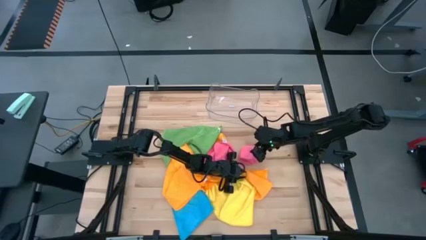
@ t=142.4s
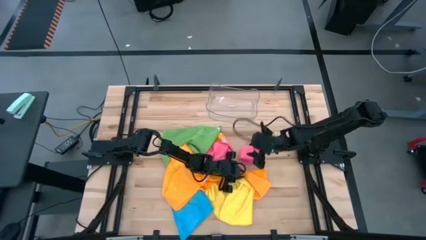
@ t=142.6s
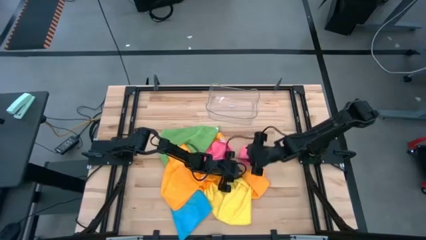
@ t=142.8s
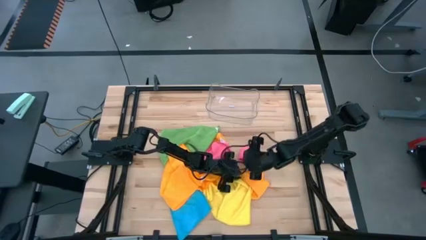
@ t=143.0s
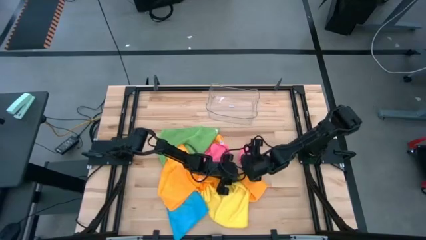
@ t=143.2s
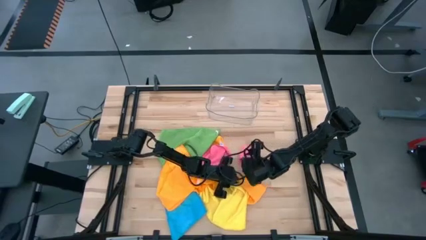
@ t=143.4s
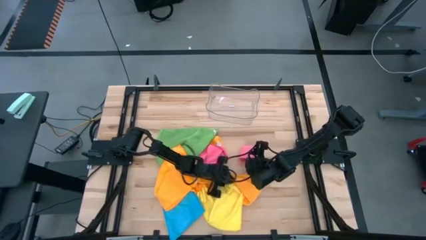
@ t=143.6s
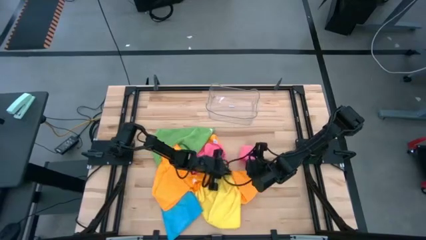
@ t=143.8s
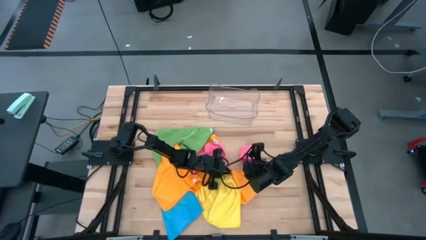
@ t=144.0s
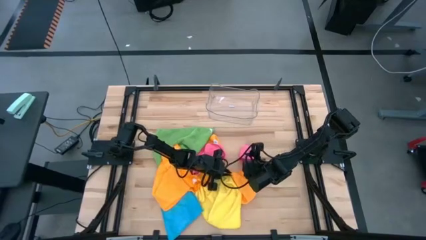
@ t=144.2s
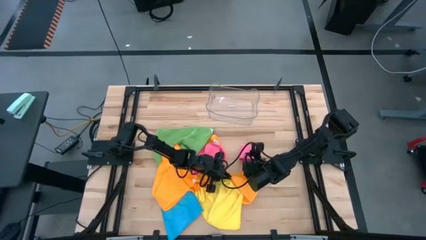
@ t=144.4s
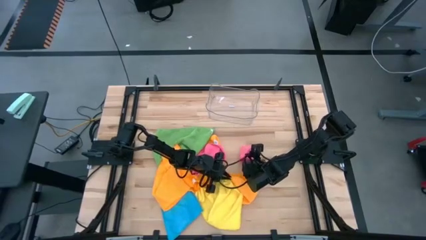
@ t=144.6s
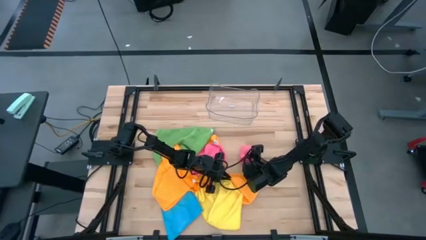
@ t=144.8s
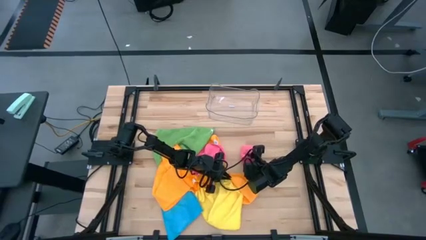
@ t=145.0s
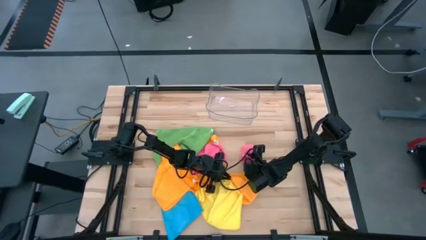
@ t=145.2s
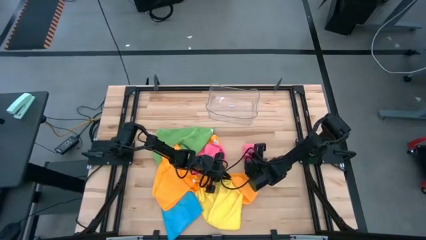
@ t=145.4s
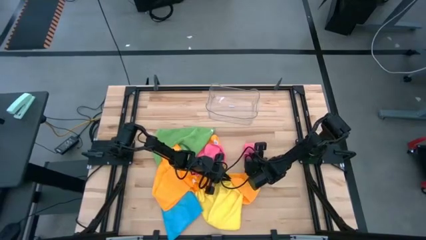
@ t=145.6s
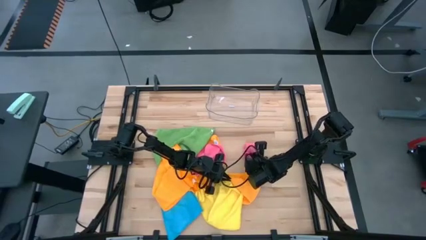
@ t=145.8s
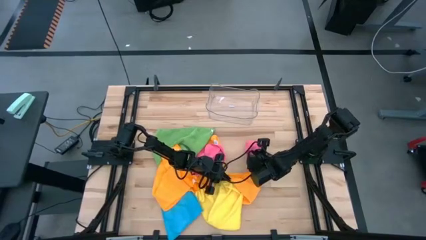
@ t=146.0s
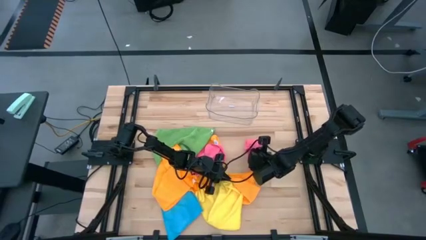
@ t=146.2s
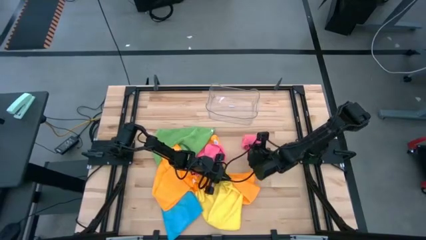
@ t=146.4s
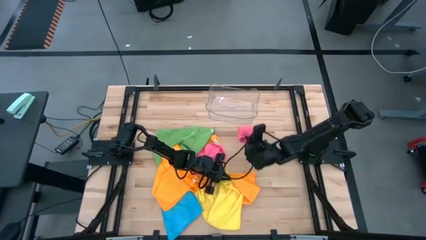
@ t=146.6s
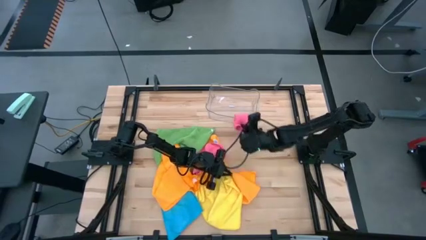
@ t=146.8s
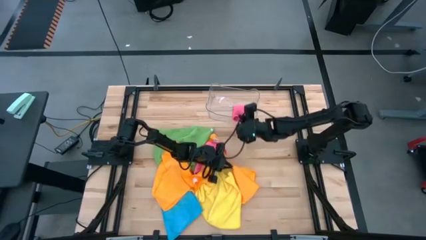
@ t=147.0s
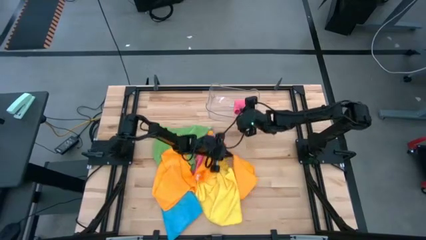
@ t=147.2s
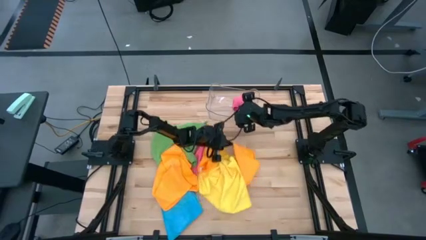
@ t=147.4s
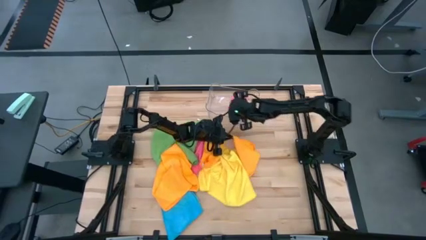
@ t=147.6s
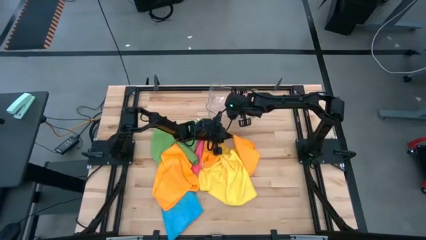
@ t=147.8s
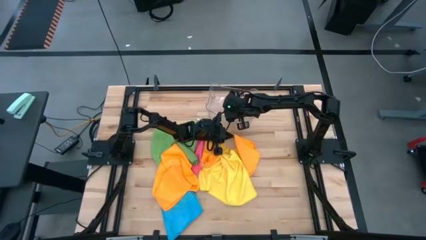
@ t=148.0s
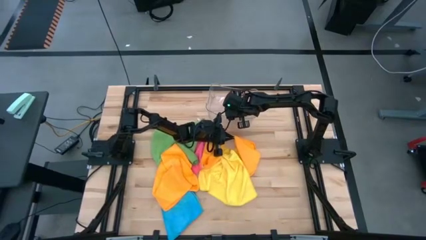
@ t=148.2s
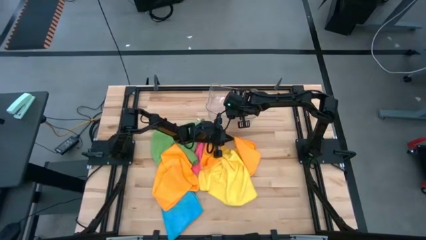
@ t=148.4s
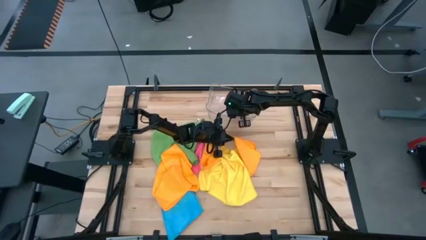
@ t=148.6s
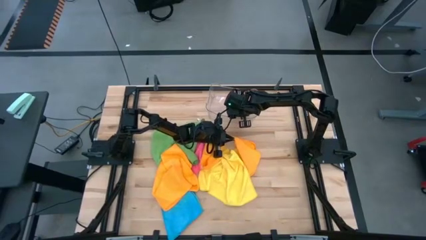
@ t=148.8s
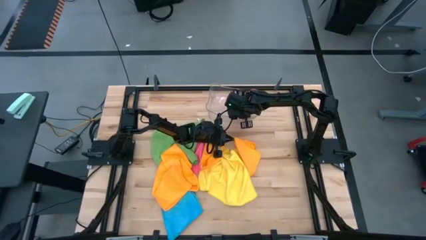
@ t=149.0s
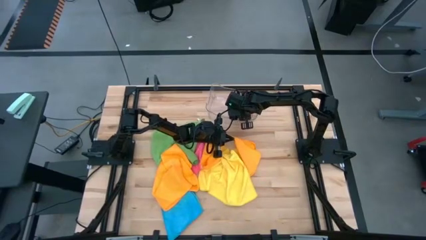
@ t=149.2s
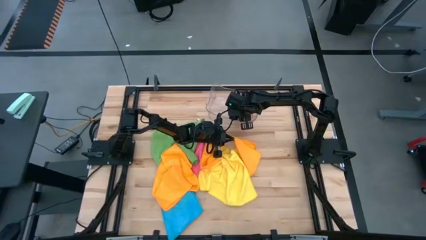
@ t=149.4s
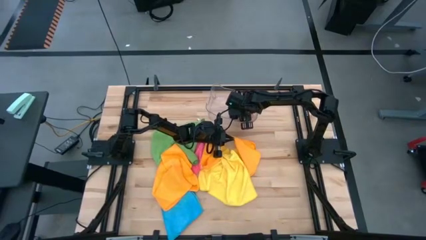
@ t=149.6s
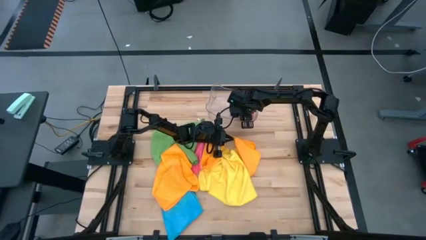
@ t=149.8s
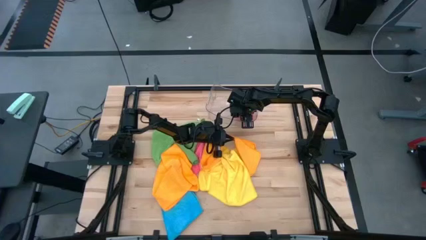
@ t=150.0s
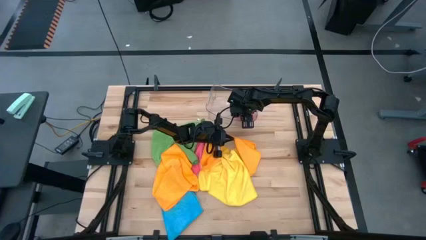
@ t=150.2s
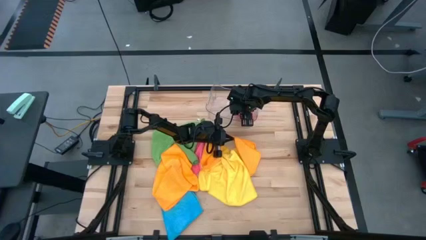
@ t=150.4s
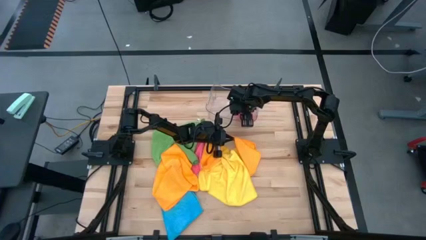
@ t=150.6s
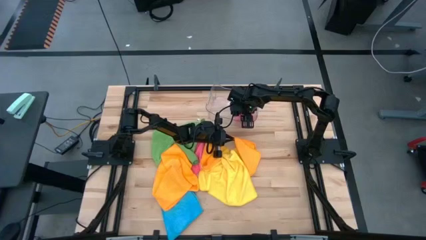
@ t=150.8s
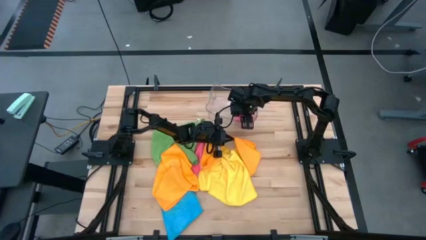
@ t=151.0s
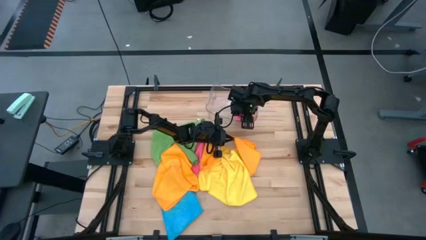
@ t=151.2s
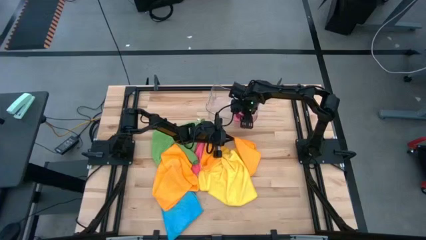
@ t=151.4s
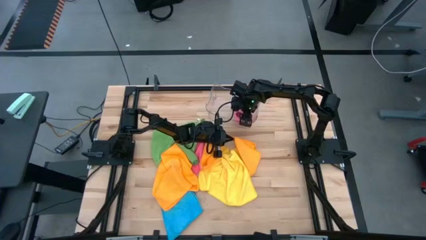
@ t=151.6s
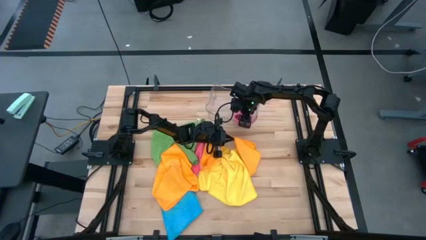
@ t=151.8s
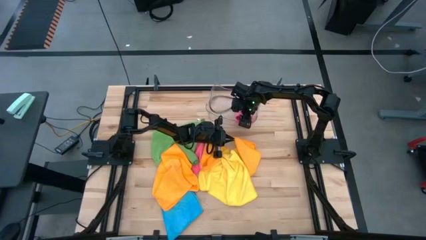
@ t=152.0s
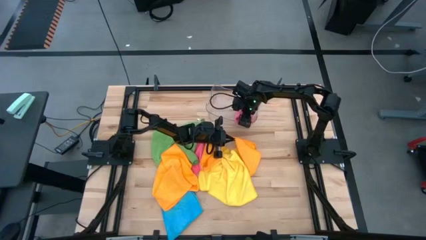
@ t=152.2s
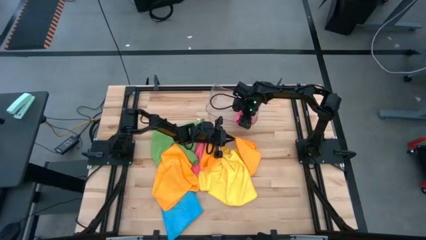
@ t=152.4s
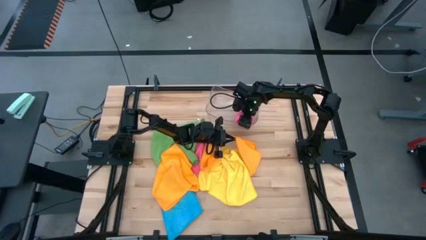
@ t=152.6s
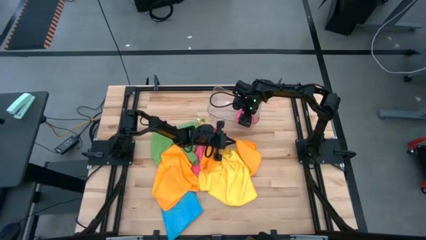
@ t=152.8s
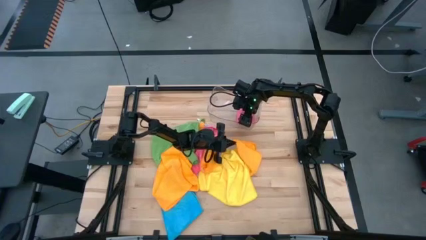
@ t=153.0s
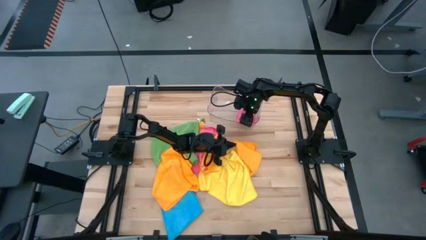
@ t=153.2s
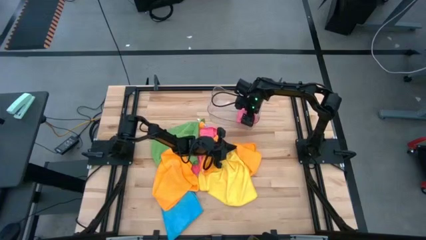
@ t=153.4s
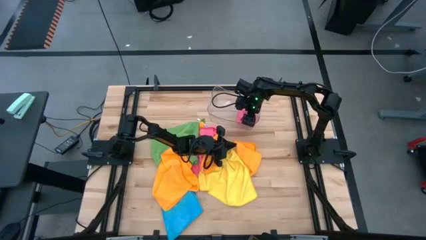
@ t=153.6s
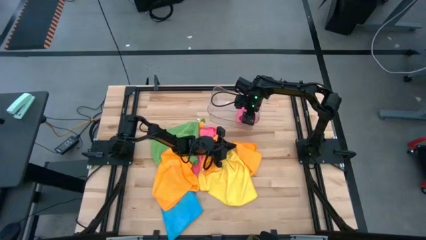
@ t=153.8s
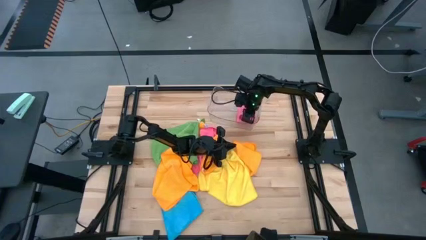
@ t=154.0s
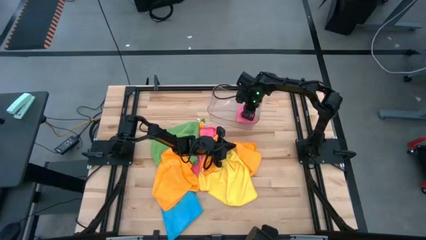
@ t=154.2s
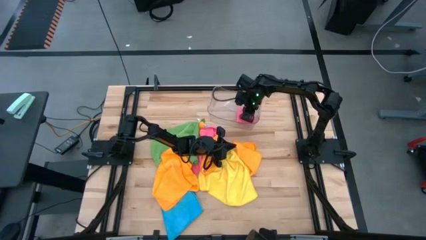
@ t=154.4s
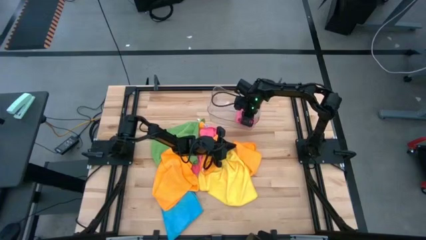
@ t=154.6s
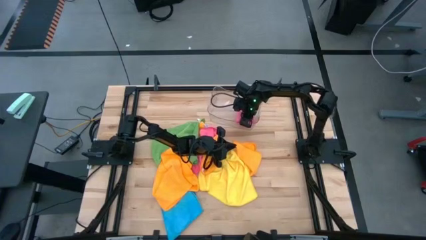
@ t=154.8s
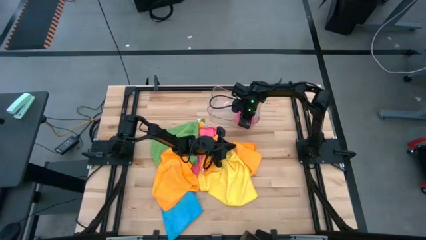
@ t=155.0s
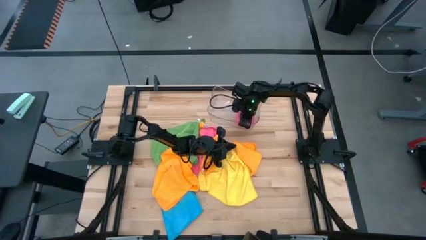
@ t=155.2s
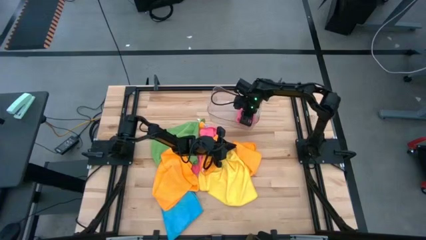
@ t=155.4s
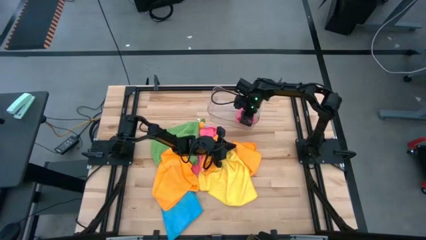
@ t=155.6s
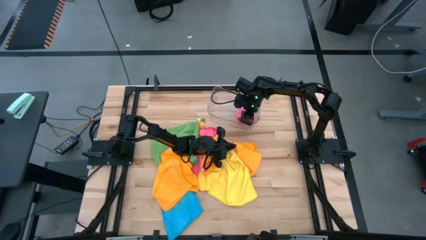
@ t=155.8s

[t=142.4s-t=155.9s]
Task: Fold microfiber towels
Put the pink microfiber cloth into the transparent bin

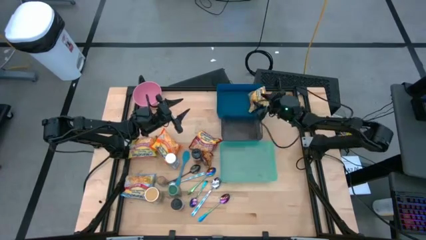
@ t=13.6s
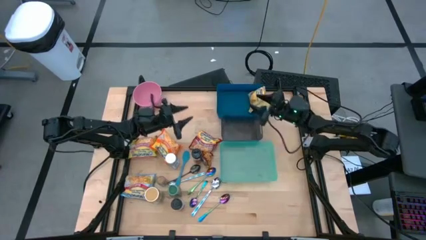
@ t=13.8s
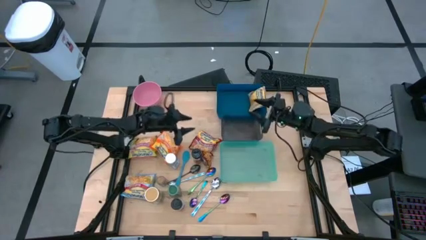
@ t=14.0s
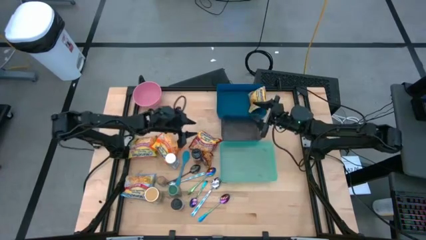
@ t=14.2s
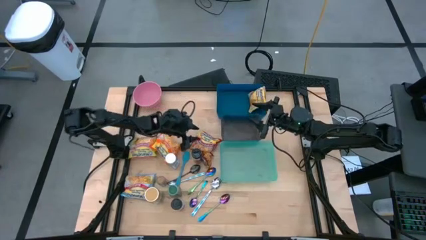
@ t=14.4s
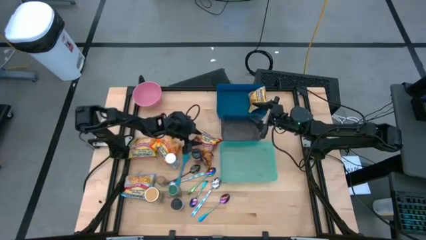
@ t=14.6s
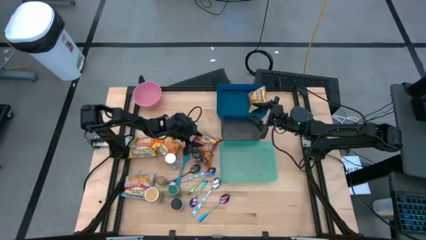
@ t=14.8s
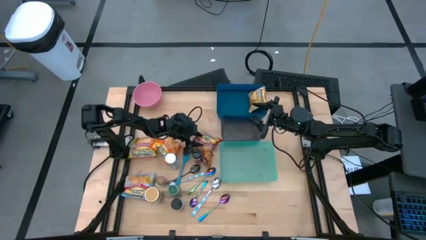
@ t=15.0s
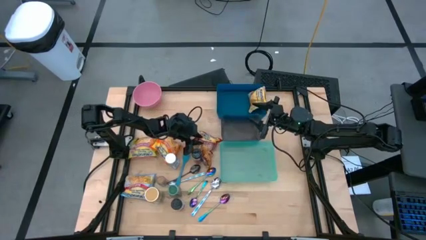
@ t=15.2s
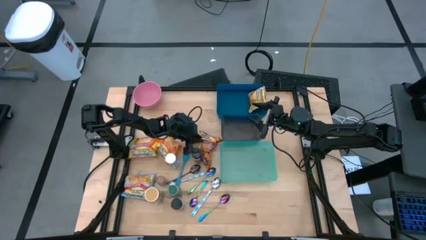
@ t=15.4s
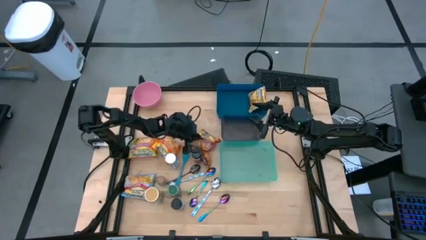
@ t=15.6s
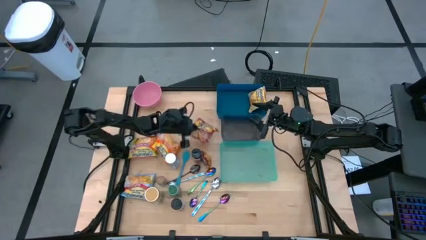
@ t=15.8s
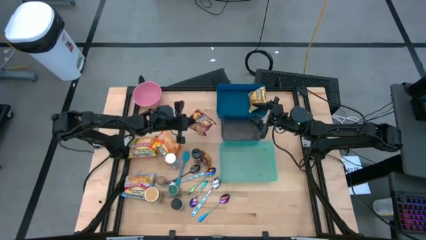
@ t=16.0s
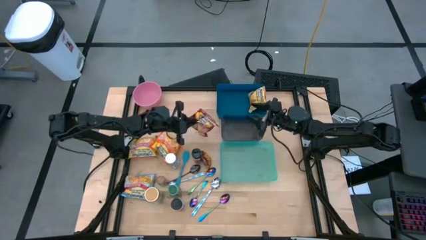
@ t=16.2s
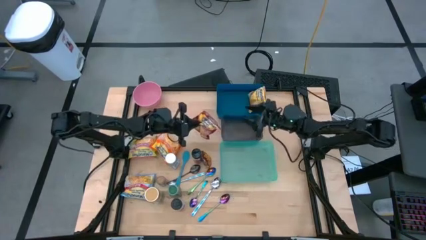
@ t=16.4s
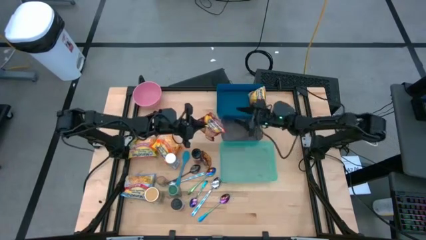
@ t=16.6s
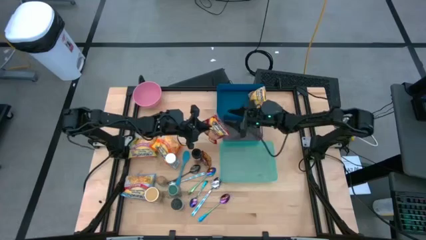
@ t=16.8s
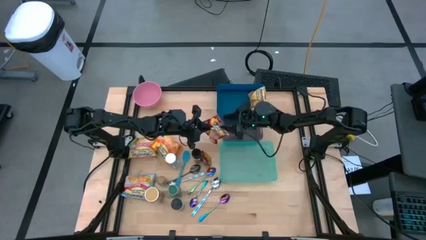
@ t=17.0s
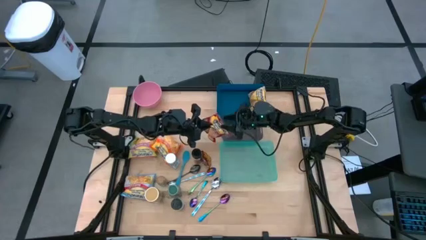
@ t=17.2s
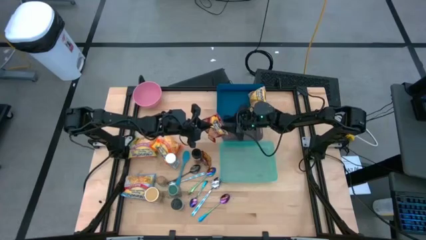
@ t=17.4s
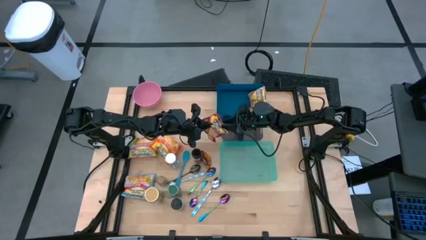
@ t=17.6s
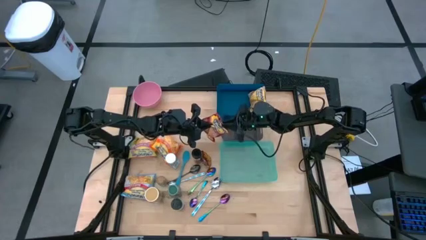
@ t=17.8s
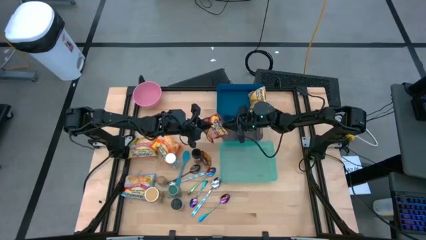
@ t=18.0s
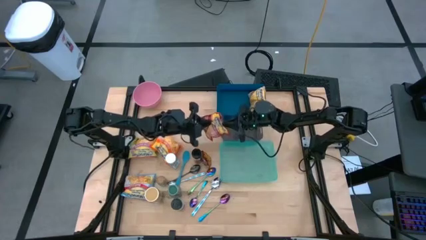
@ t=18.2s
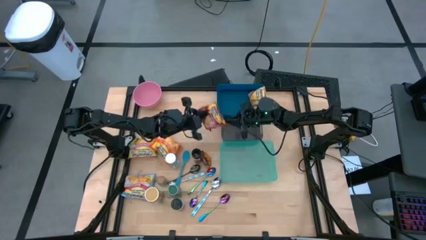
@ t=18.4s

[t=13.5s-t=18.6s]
Task: Pick & Place Food Item
Put the red noodle pack into the blue bin
